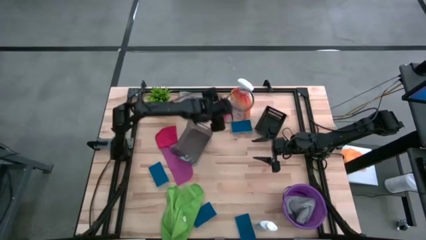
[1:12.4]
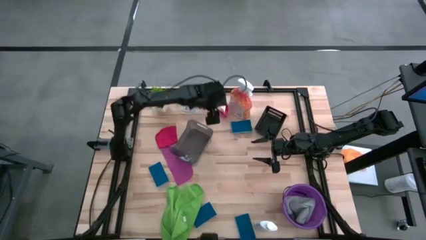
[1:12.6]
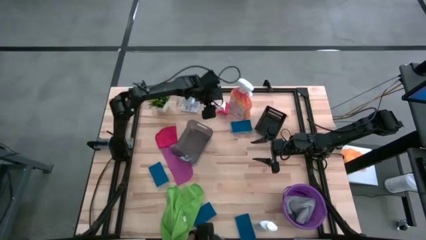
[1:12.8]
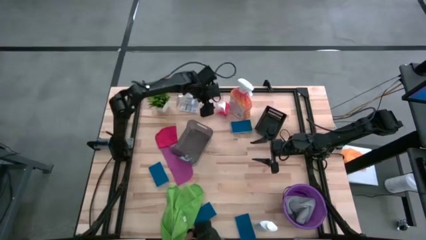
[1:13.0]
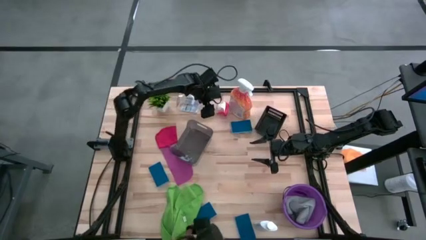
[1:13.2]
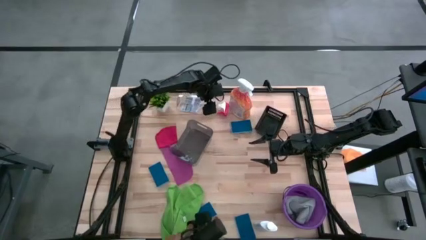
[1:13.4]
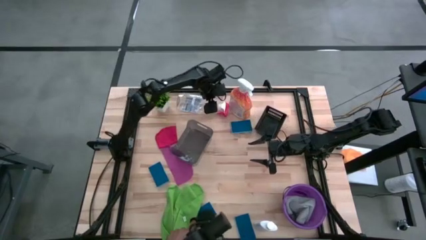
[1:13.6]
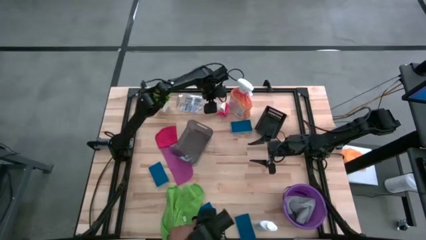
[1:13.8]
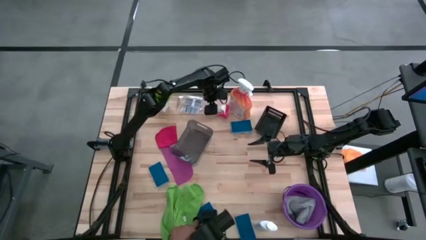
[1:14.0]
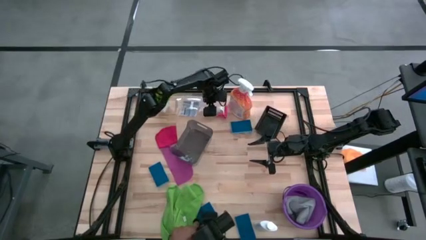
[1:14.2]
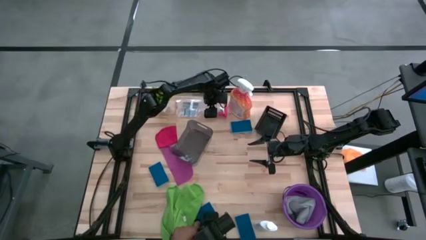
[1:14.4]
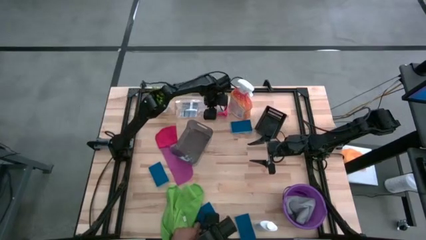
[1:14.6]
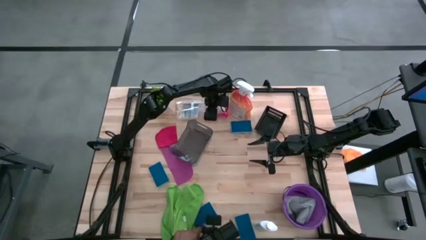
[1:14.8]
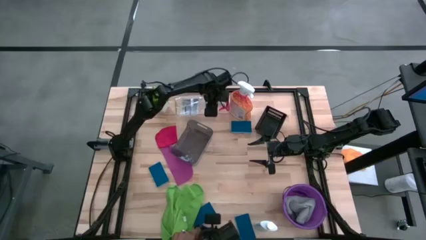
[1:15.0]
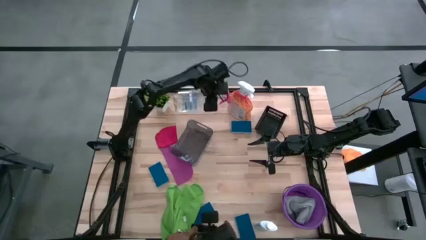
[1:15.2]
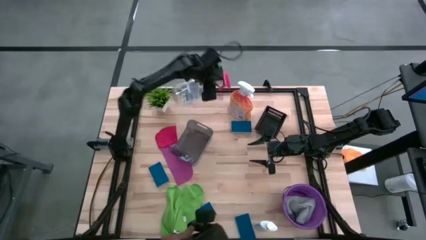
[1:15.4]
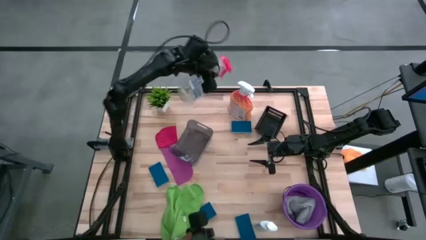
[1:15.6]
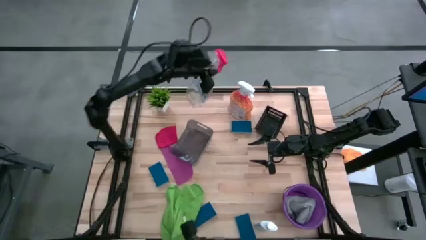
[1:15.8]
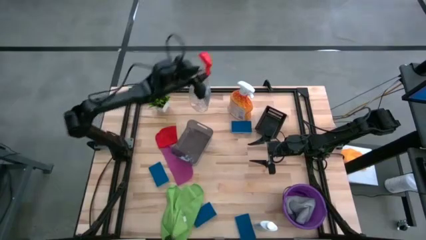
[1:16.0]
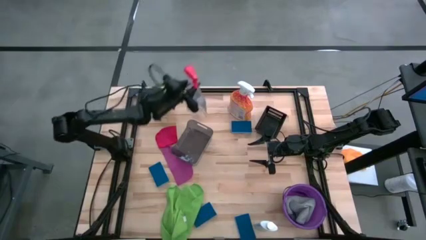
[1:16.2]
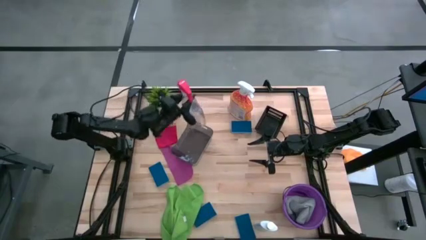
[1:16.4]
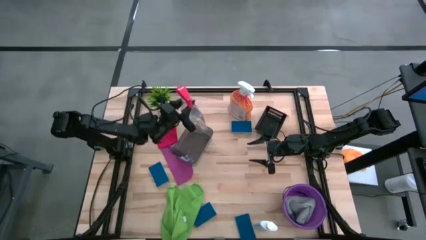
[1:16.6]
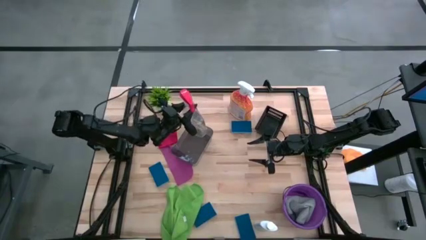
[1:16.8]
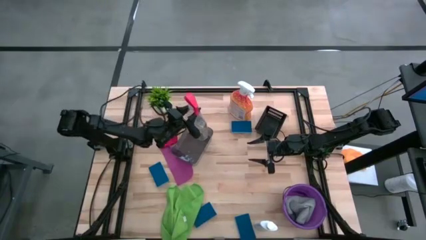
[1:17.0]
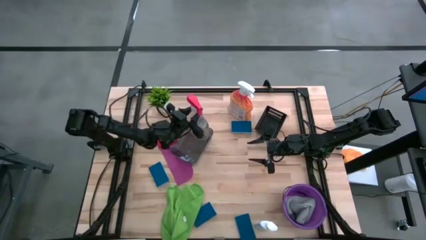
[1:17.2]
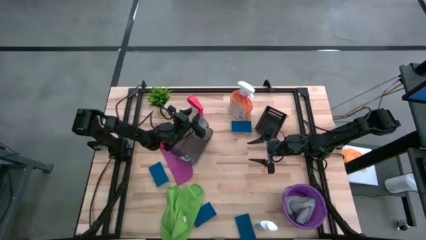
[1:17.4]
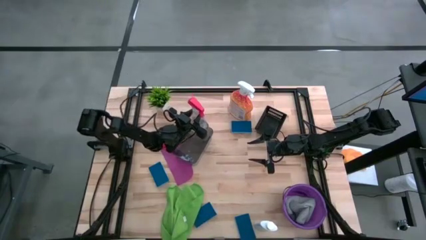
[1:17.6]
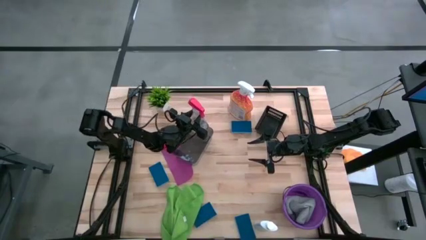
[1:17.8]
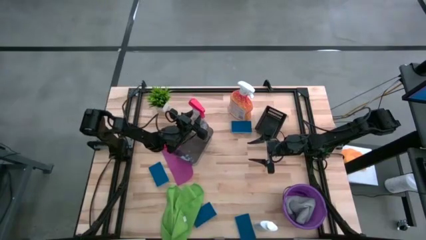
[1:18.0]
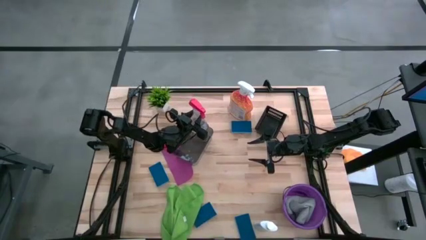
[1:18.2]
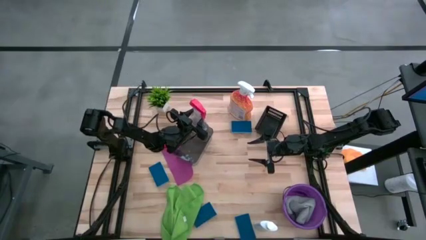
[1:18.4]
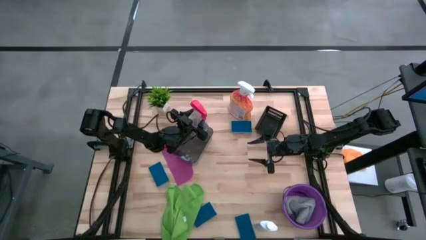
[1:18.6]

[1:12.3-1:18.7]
Task: Pick & Place Kitchen Items
Put the transparent spray bottle into the gray bin

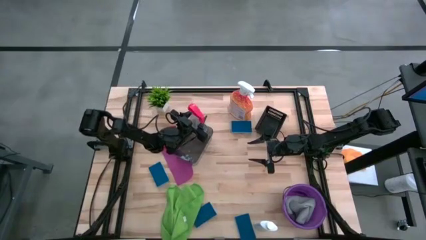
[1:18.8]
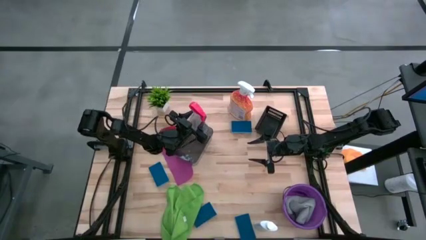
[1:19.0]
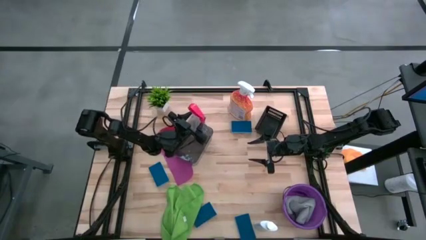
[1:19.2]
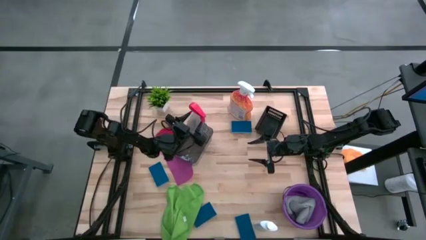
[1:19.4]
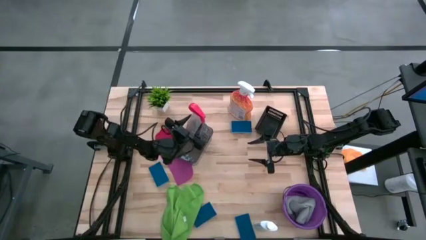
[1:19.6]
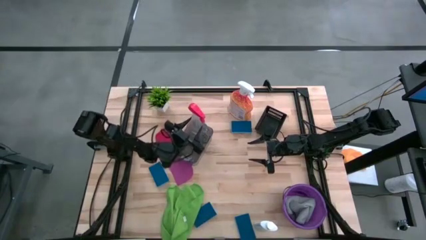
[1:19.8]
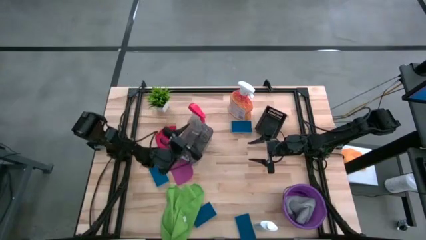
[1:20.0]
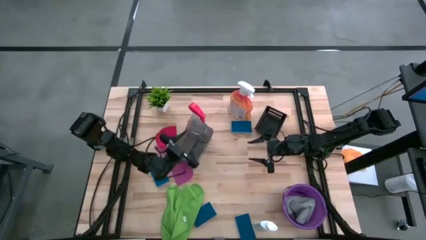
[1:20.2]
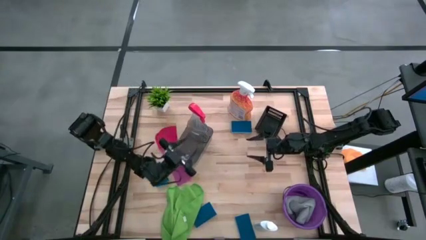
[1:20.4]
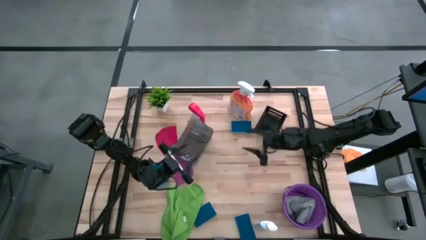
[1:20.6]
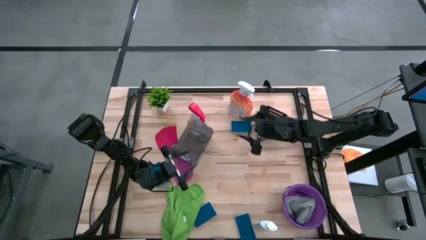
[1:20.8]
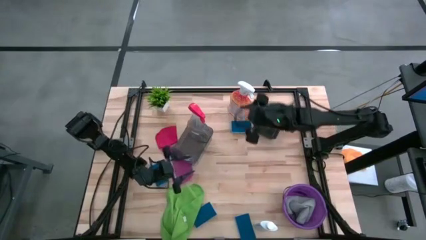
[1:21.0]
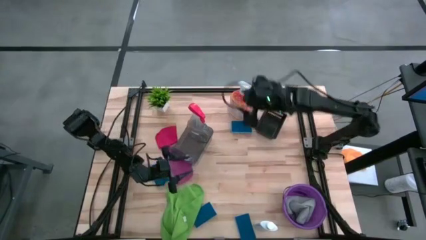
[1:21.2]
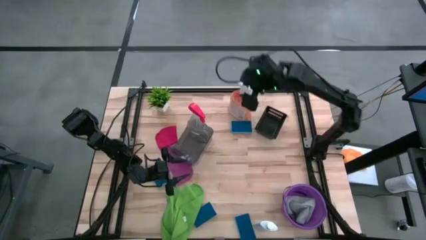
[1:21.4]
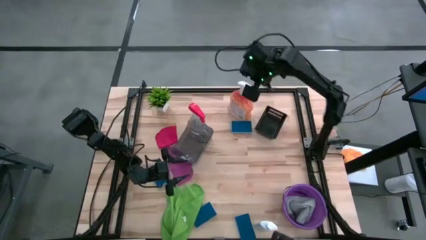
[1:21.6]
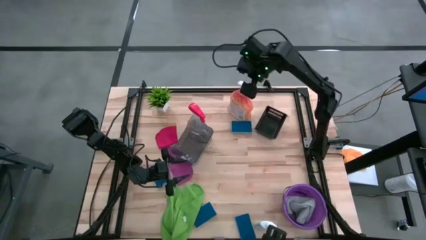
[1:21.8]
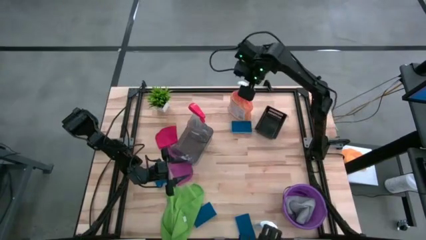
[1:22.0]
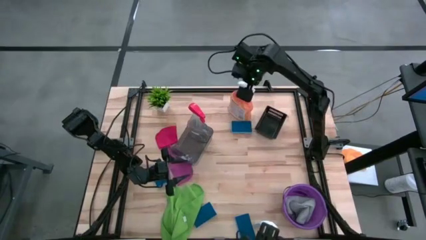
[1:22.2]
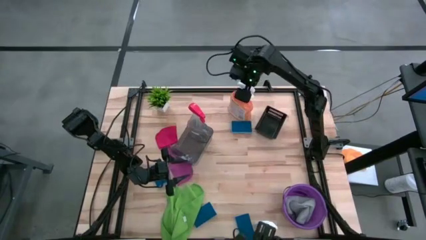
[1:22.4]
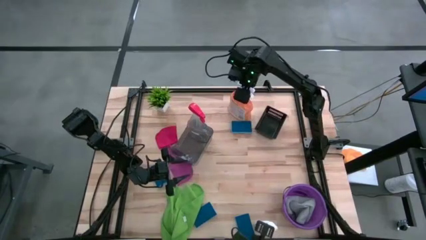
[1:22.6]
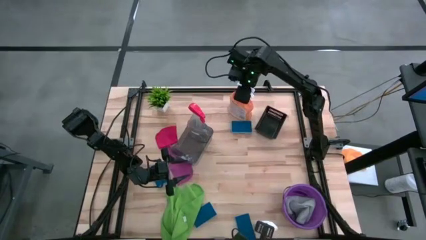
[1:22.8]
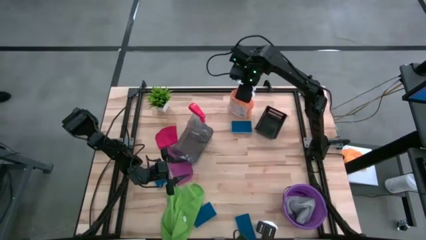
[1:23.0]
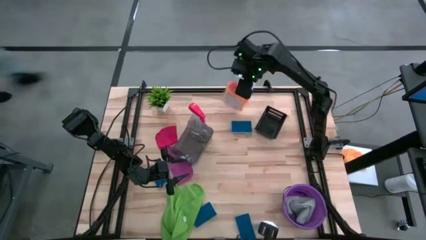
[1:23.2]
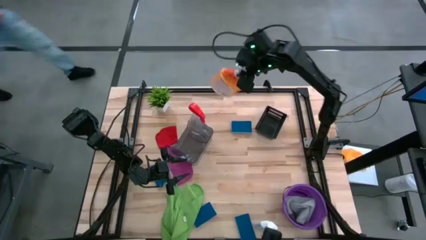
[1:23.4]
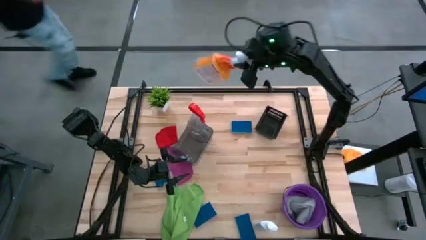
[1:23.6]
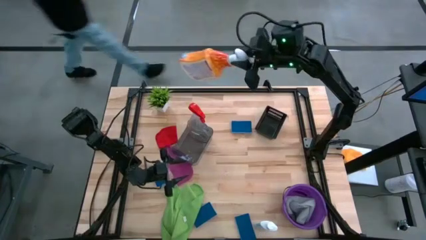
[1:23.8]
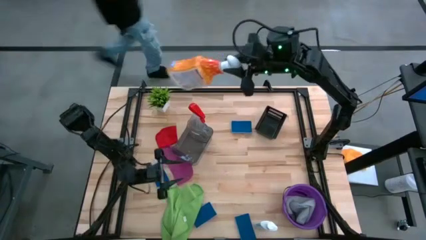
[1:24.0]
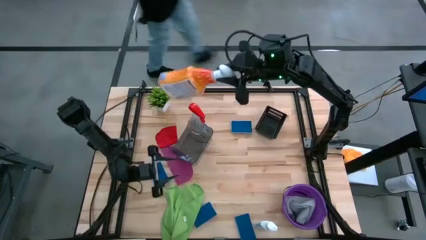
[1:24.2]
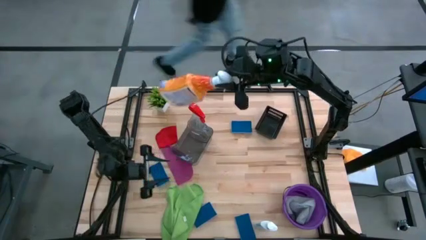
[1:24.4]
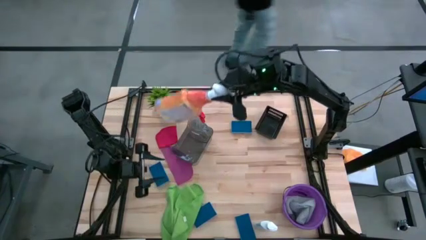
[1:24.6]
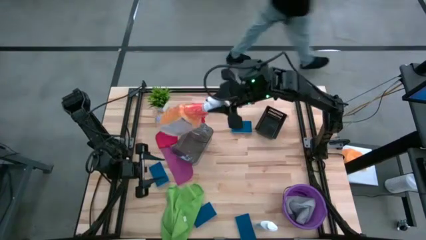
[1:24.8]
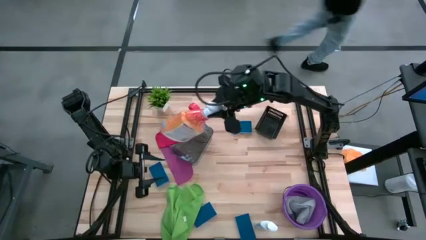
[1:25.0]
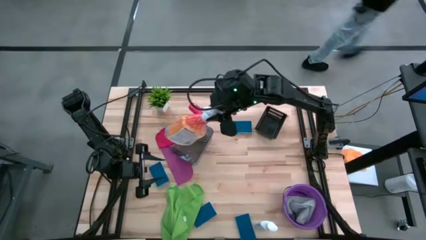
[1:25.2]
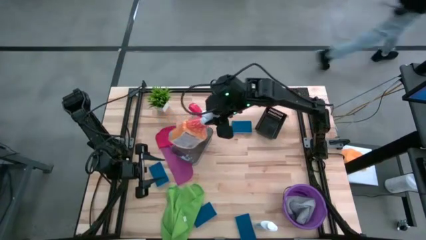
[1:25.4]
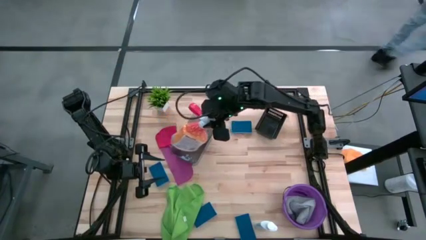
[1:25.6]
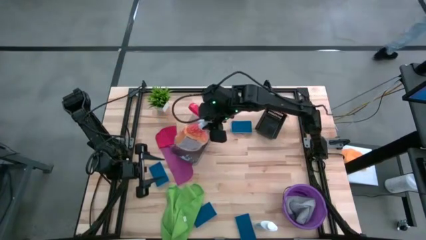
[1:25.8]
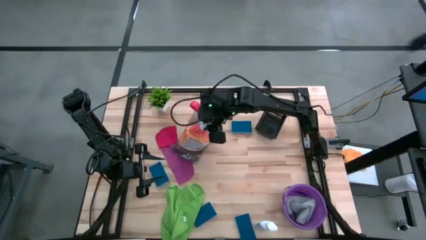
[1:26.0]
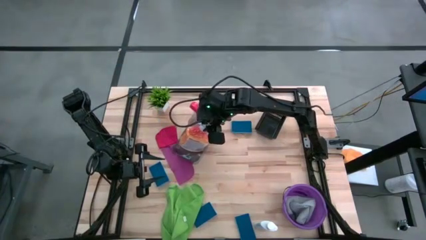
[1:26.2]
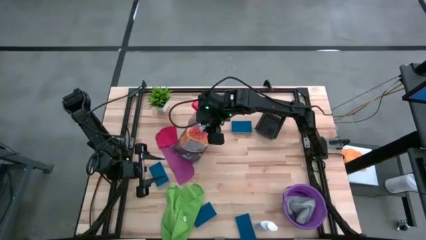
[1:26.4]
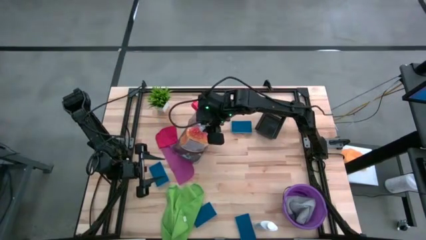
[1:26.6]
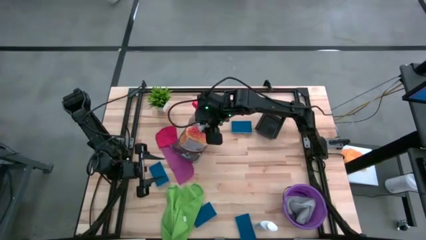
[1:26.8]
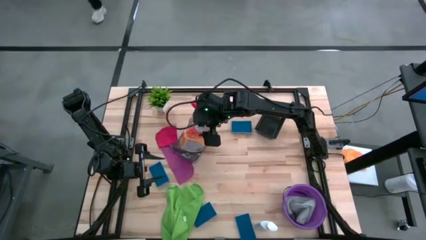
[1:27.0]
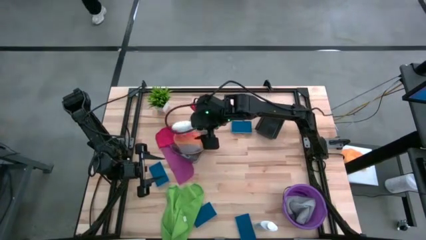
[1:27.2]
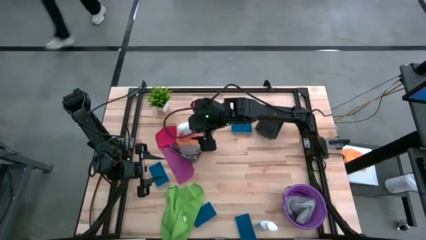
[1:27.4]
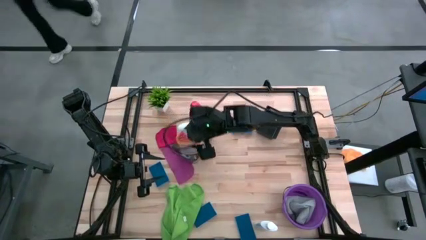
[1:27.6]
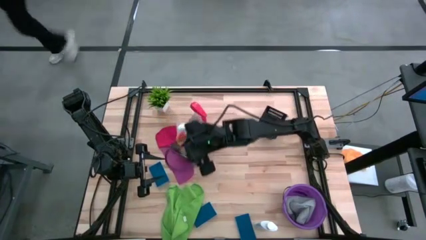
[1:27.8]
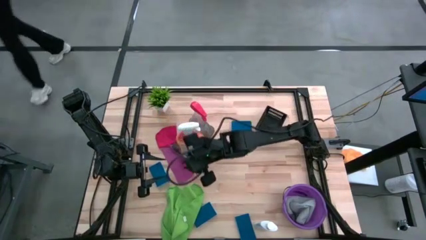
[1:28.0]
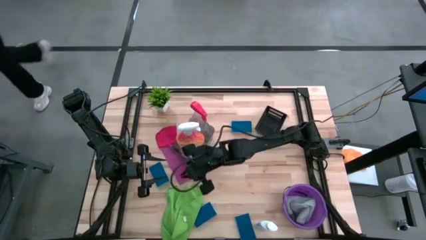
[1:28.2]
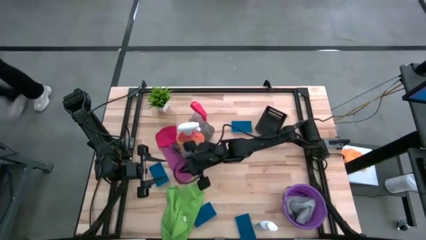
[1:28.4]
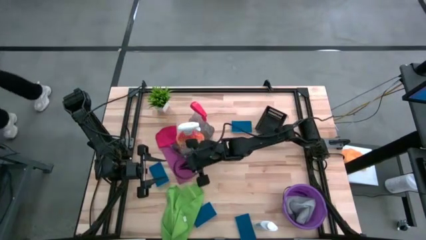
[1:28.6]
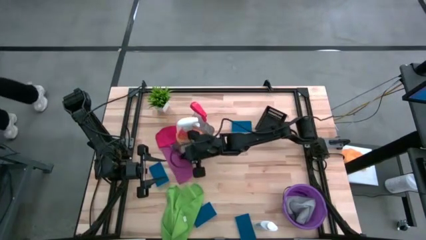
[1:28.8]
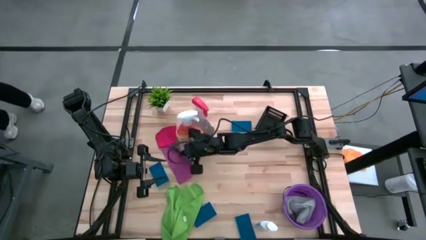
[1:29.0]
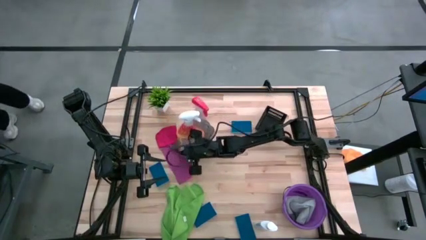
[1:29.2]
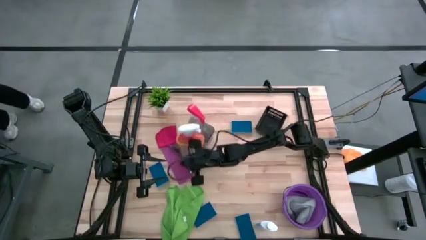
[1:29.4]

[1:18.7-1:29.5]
Put the orange spray bottle into the gray bin
